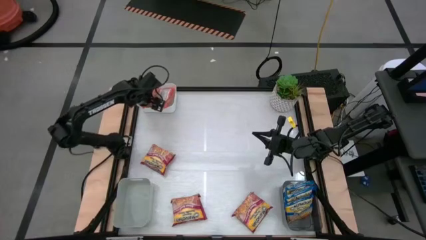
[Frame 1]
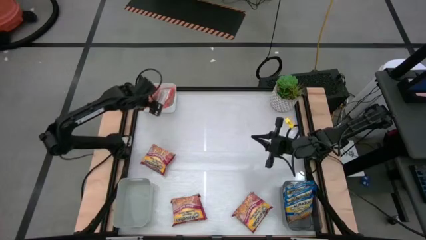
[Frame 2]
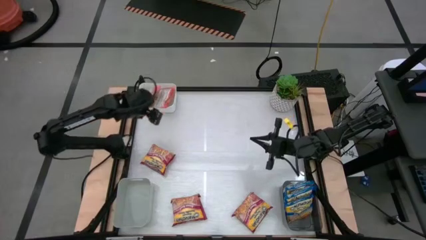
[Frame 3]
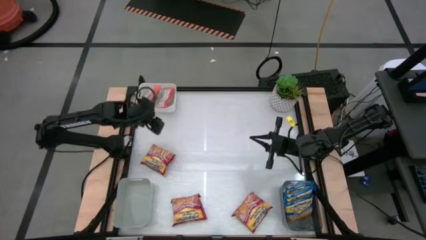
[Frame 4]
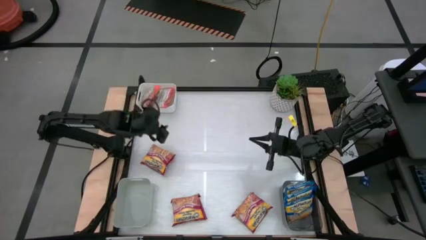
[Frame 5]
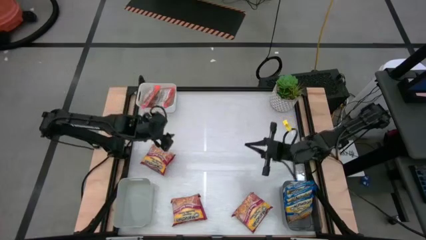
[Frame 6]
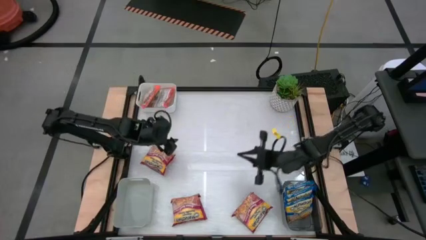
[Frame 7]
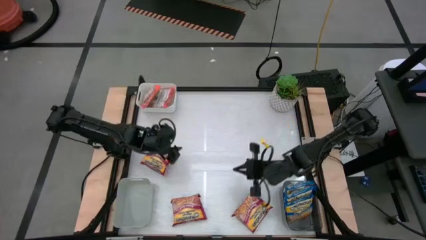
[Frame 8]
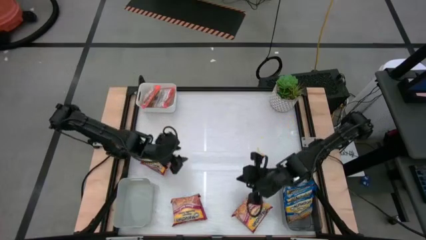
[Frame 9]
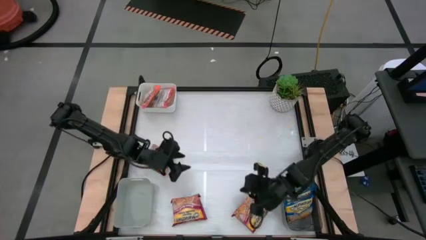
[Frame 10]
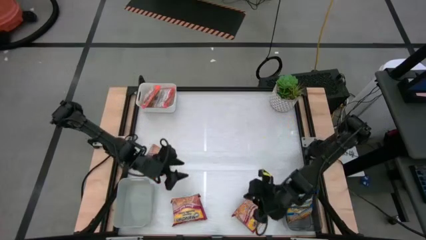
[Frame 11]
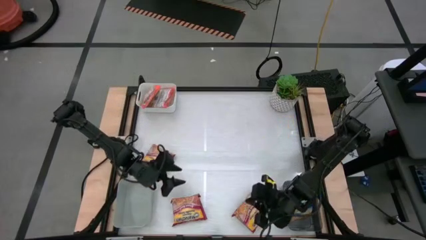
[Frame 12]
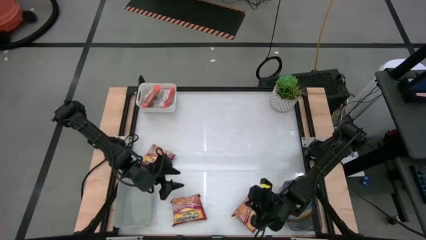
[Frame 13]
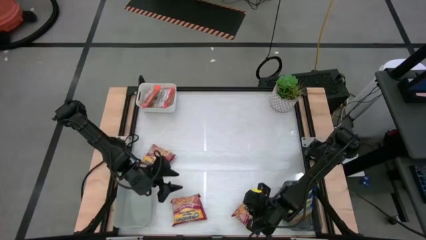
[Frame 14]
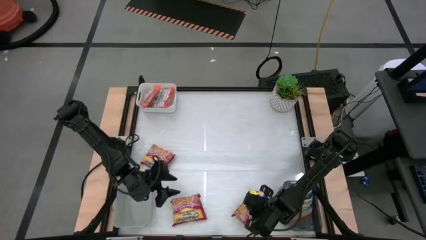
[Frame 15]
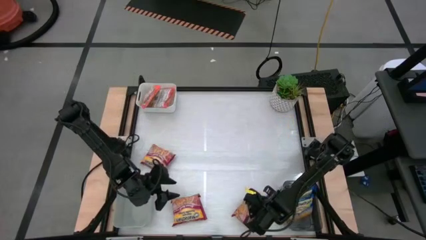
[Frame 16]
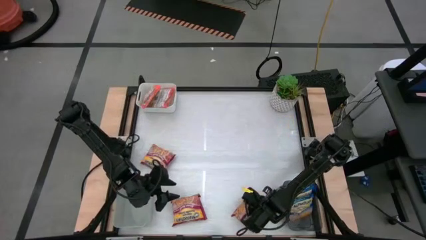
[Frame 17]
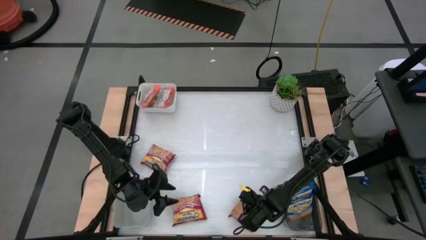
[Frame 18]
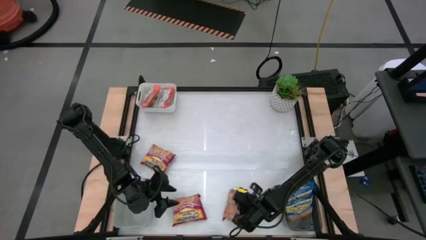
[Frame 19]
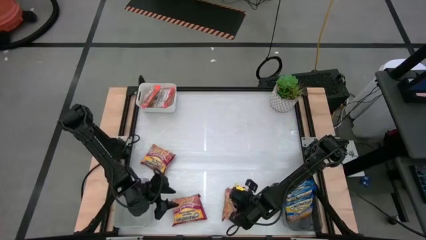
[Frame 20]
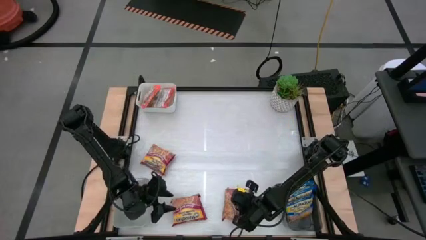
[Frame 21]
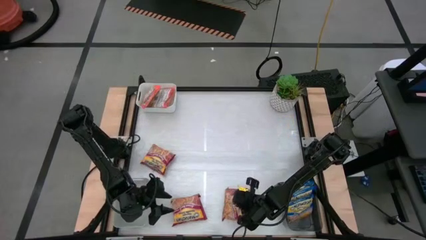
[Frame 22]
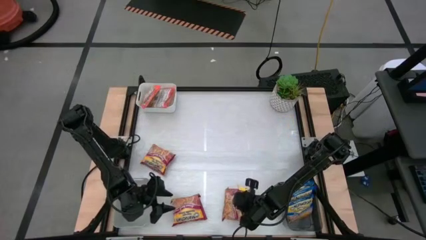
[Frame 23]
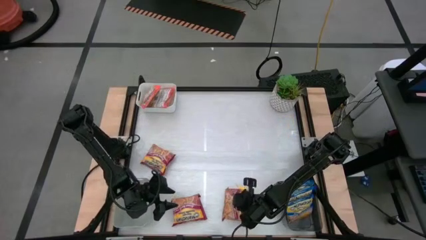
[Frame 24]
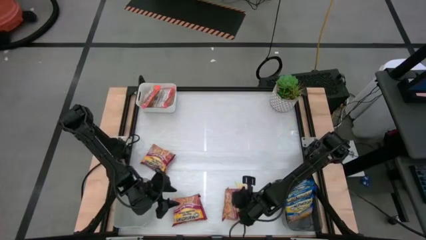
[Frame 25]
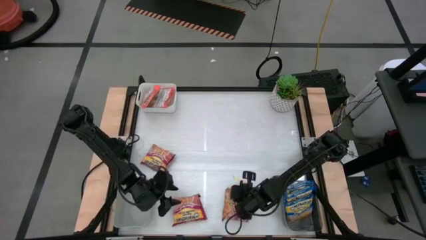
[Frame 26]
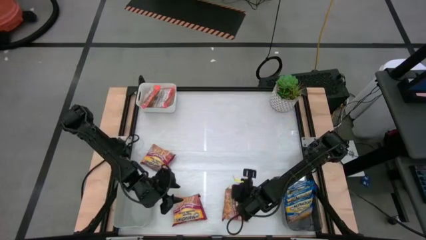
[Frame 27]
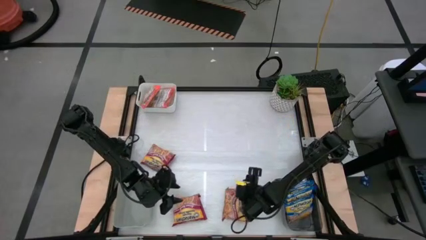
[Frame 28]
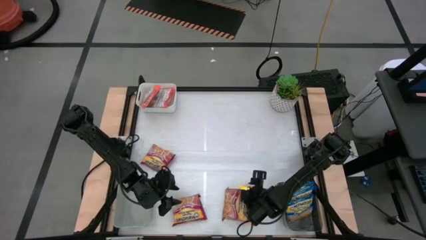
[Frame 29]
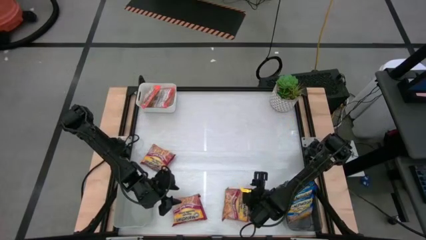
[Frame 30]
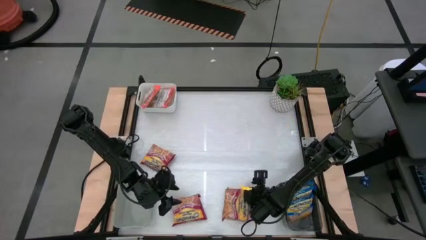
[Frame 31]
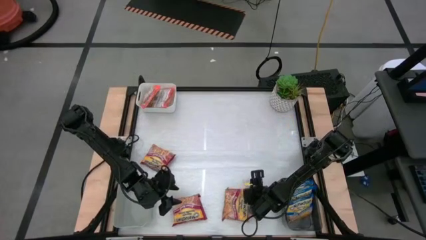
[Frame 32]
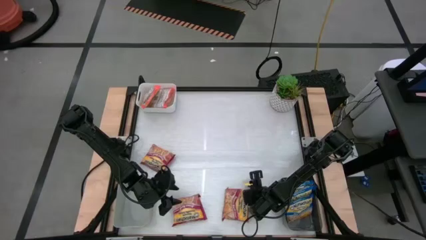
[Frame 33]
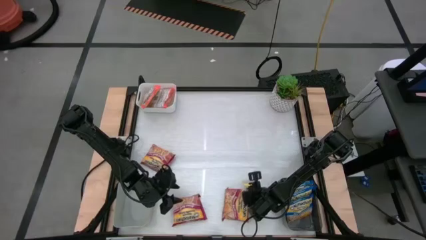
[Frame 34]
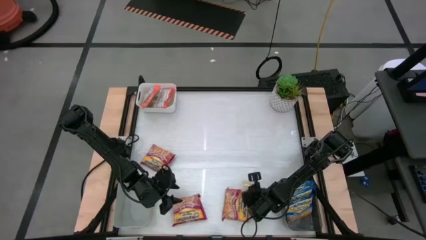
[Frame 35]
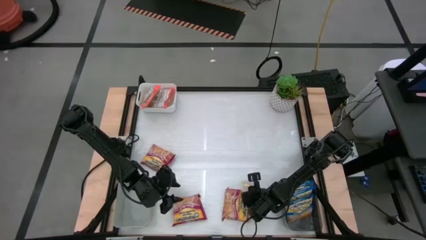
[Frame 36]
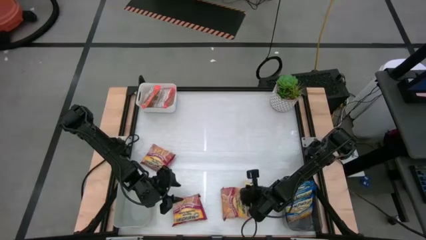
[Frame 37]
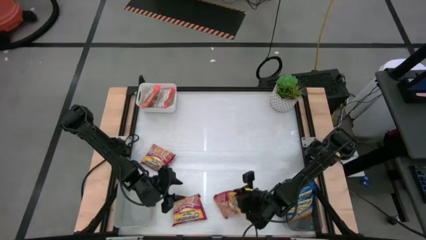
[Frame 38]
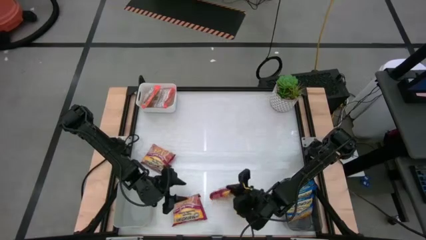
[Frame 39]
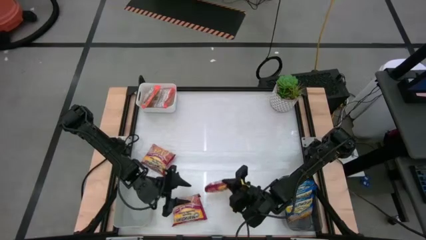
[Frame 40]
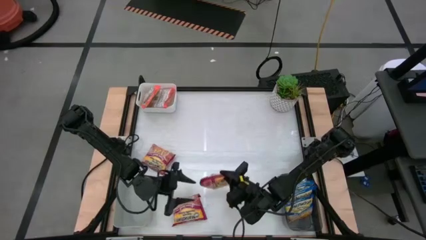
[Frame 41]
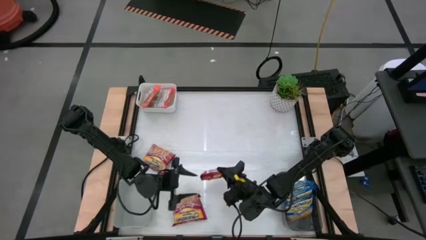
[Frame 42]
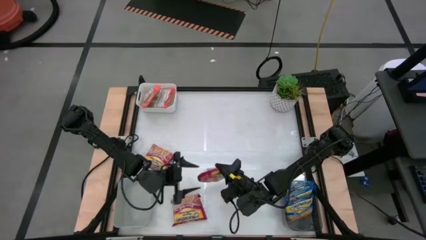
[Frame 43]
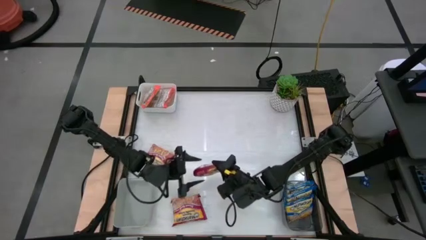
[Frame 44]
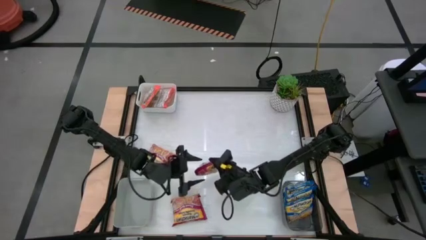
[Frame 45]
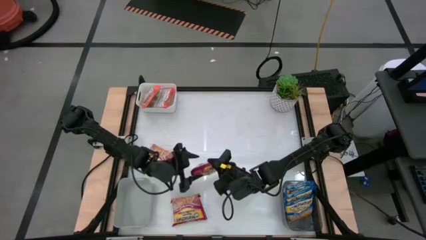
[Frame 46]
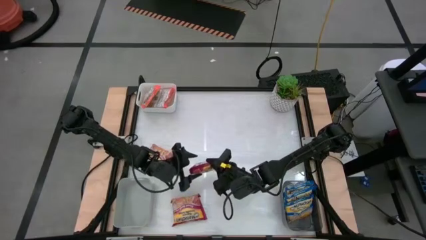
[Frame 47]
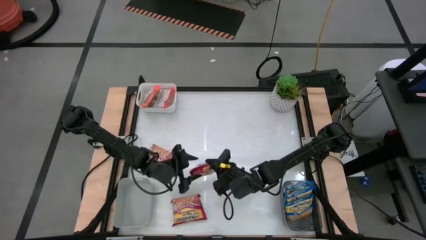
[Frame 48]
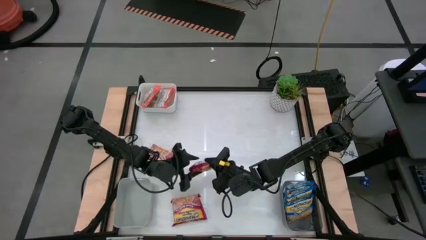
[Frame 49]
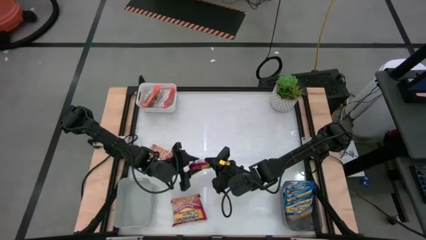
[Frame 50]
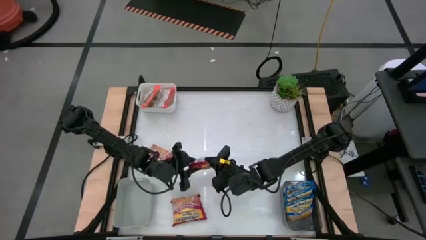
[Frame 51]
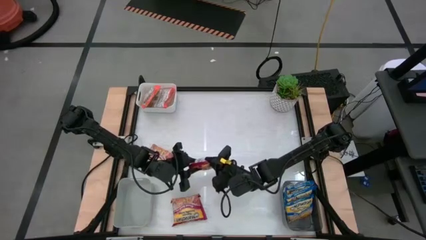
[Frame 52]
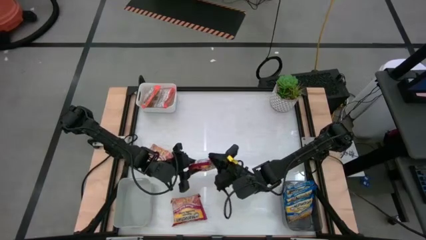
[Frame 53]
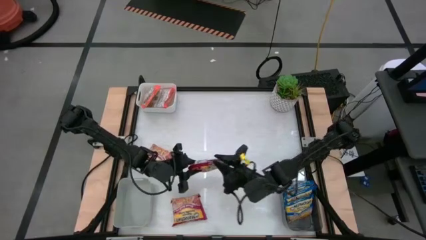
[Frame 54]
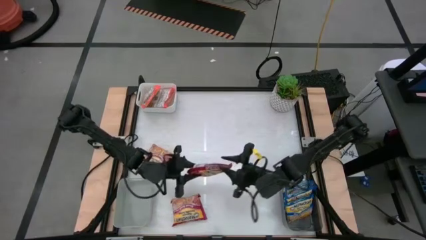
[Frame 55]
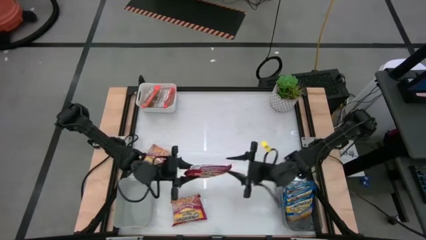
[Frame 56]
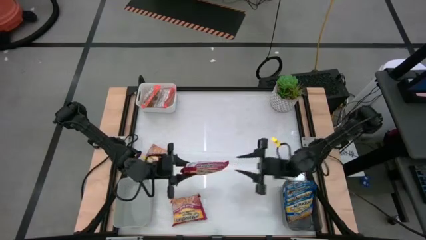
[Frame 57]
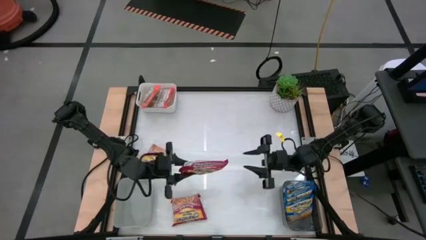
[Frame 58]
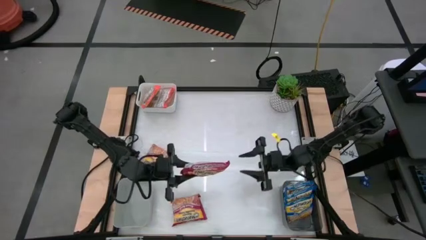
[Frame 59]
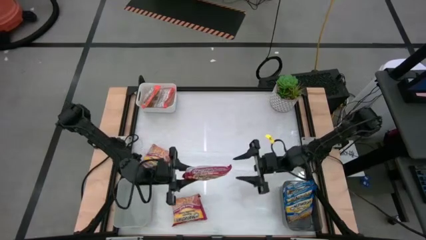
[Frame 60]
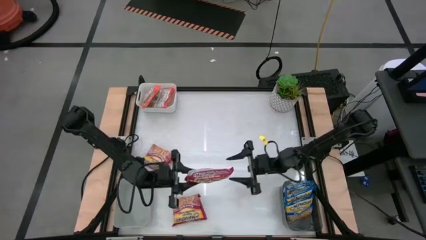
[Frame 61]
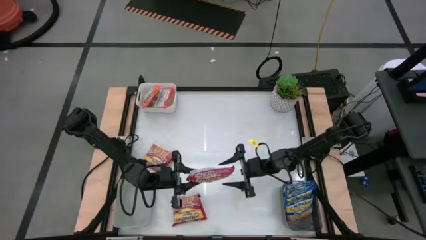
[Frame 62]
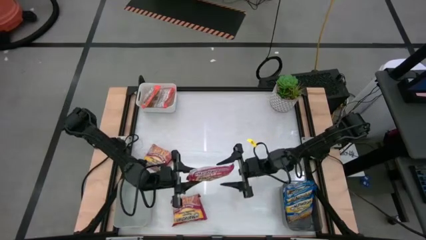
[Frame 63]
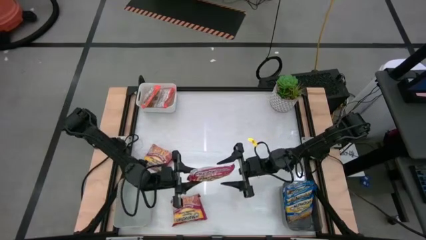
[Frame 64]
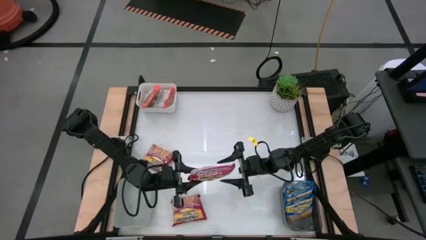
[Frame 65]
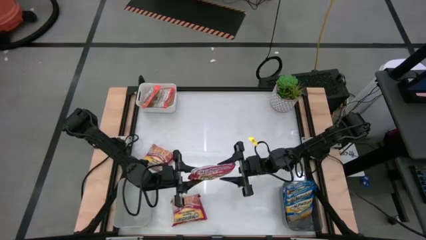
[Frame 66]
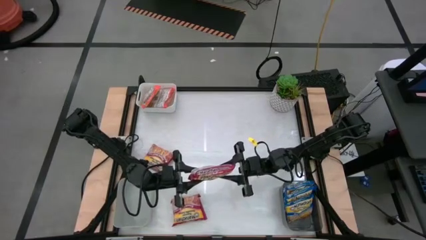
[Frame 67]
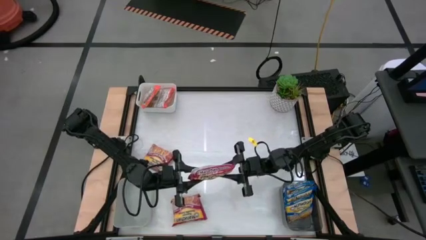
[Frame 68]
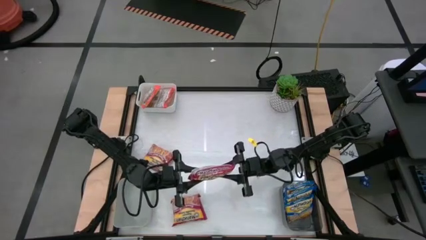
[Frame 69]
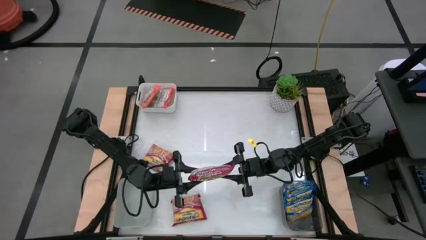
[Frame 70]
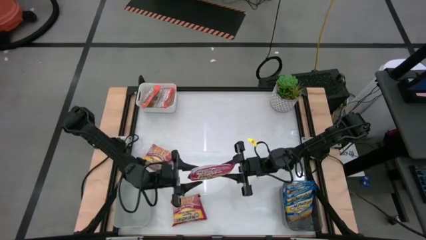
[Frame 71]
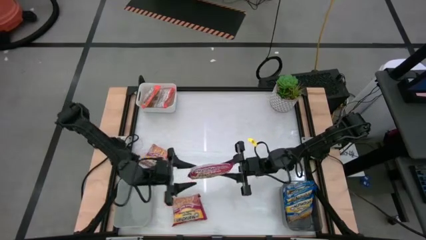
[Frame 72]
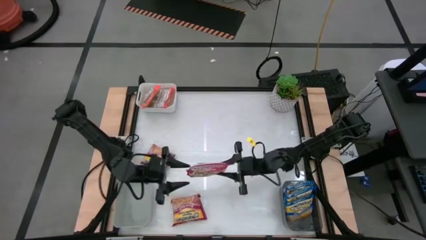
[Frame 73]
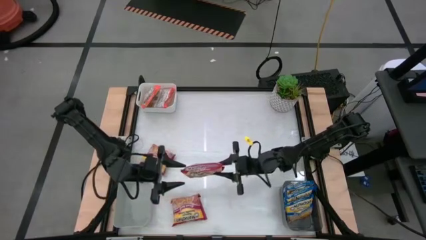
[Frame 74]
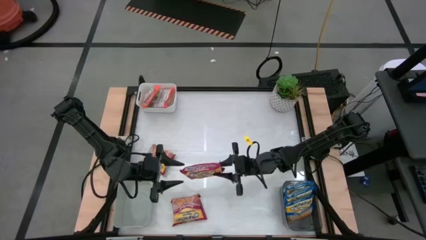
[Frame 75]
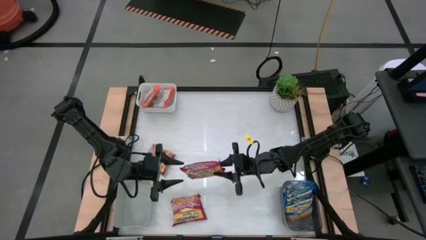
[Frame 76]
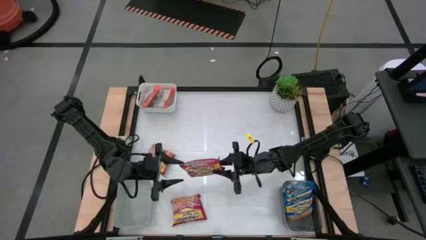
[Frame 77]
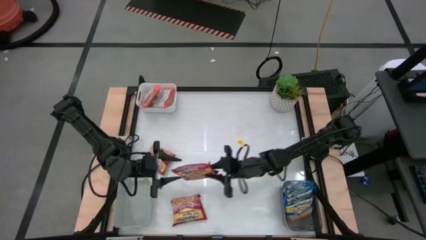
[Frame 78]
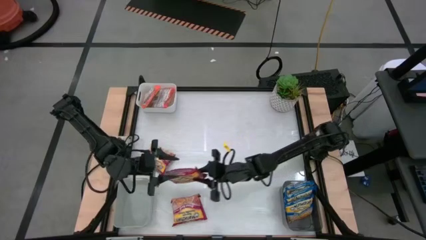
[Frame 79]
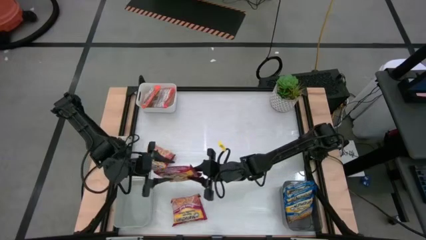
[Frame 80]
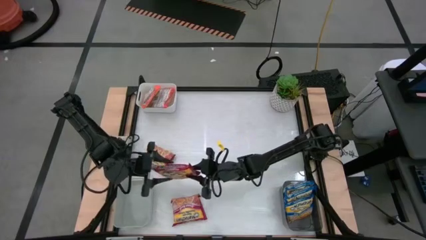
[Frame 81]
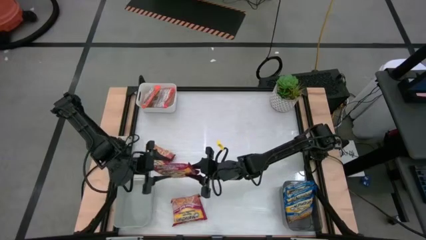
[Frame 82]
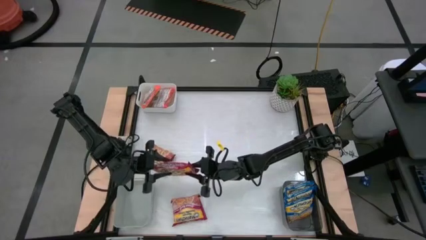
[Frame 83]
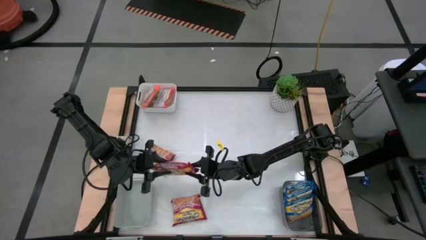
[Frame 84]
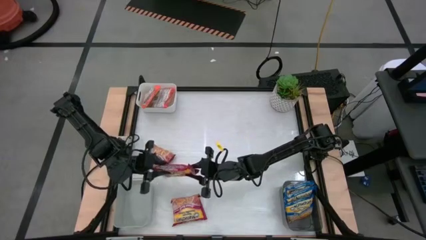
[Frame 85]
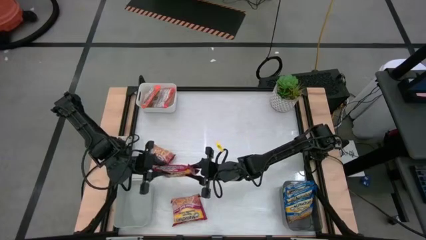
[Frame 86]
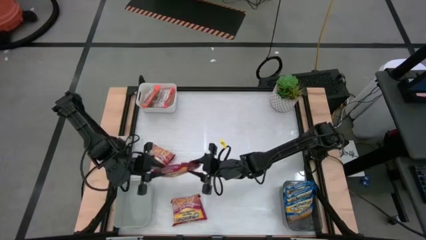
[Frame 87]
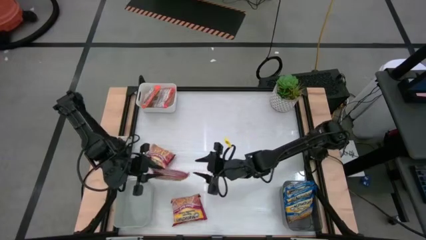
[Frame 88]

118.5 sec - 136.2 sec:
Task: Sort Maruchan noodles
Put the bottom right red noodle pack into the gray bin
